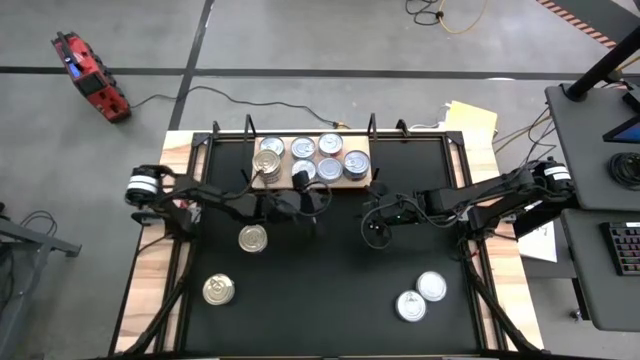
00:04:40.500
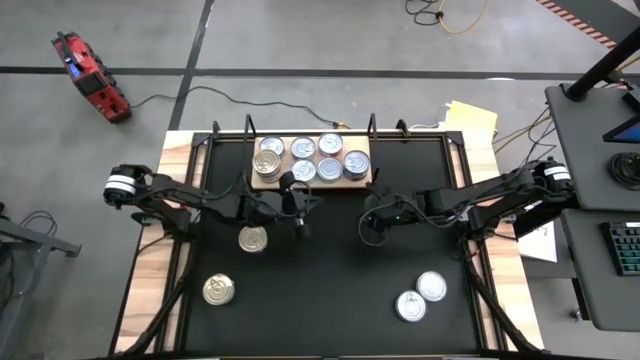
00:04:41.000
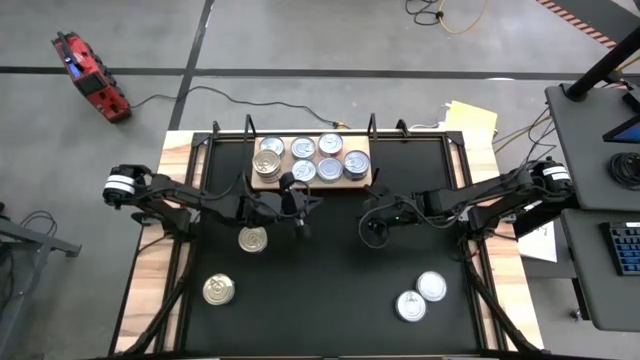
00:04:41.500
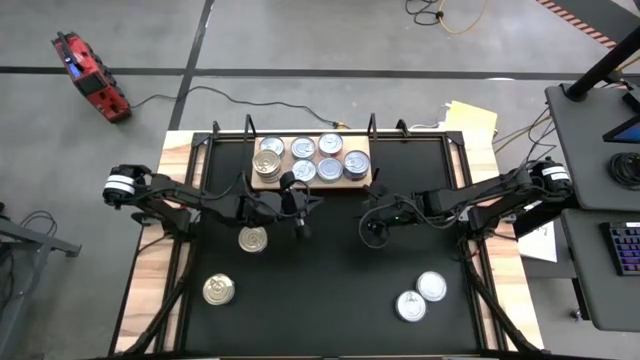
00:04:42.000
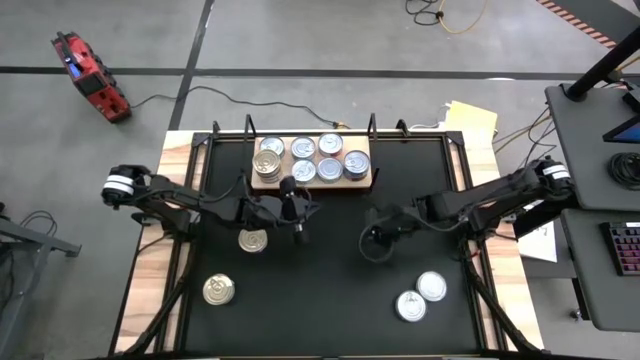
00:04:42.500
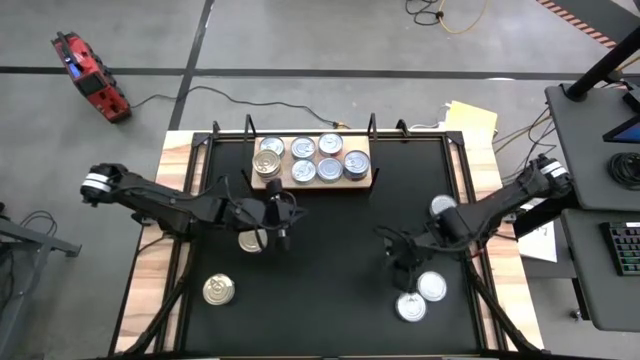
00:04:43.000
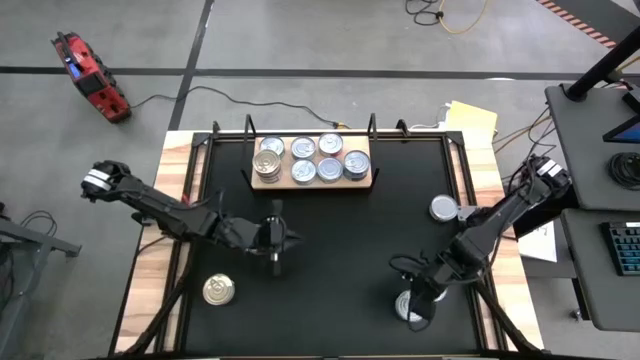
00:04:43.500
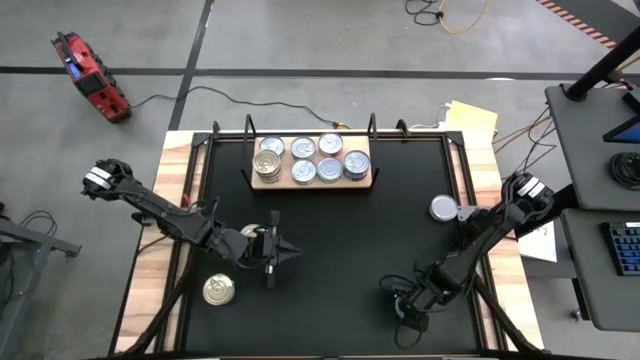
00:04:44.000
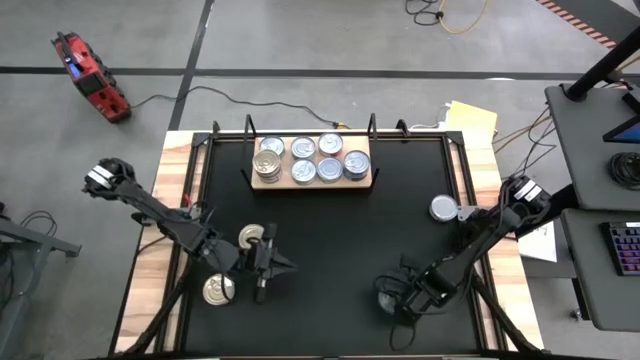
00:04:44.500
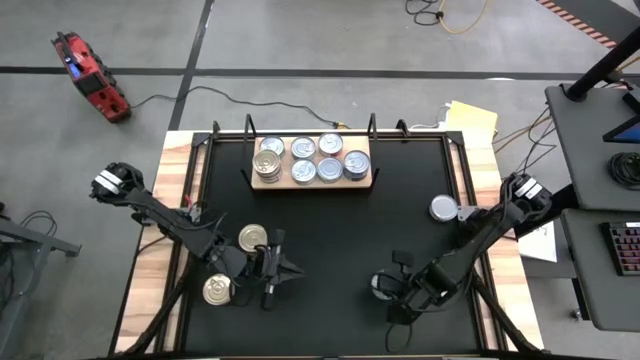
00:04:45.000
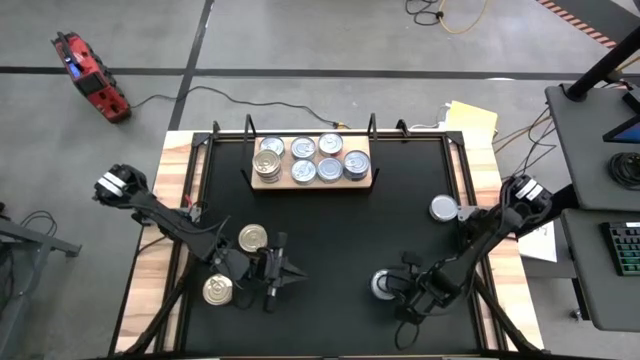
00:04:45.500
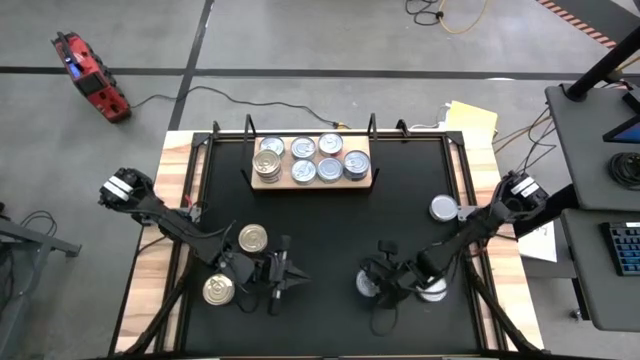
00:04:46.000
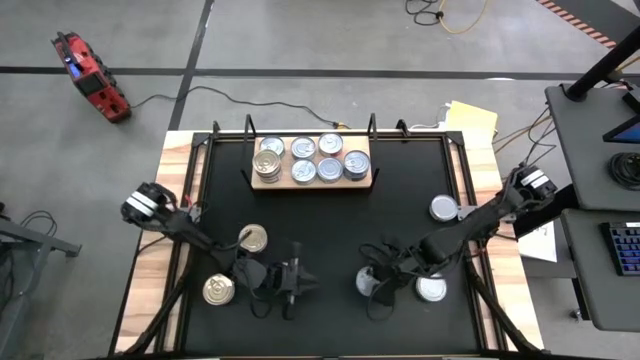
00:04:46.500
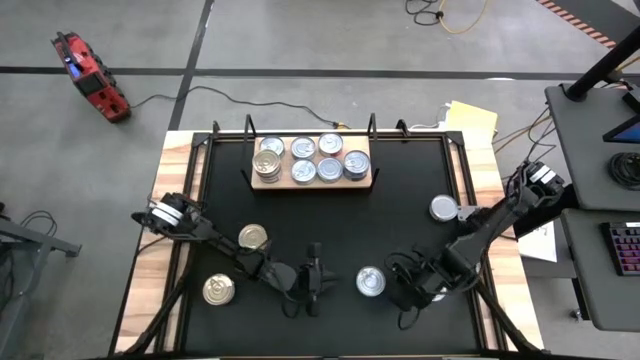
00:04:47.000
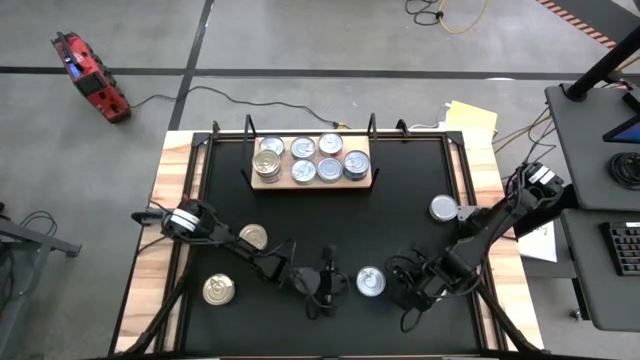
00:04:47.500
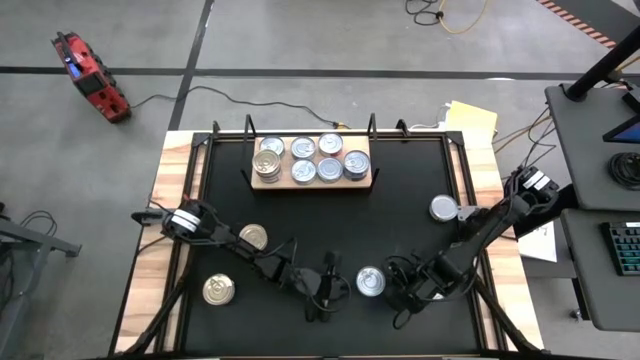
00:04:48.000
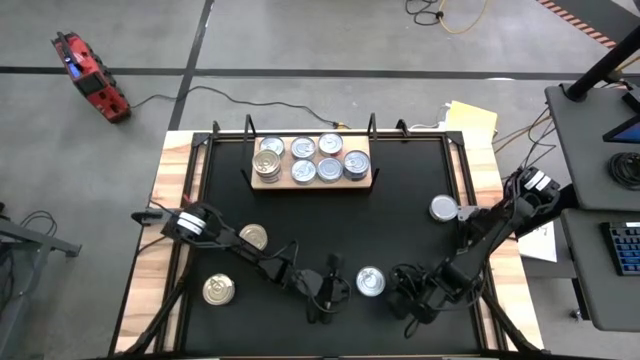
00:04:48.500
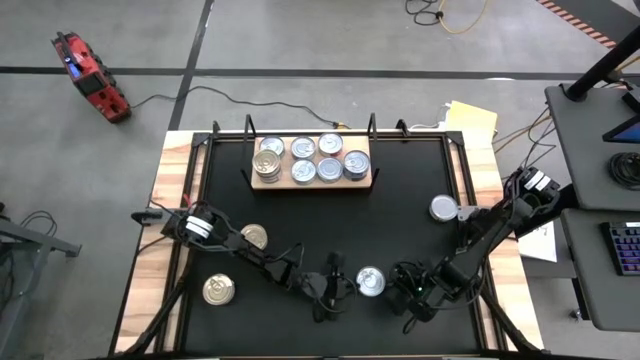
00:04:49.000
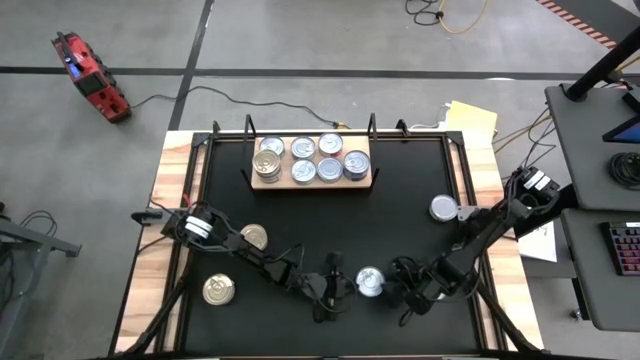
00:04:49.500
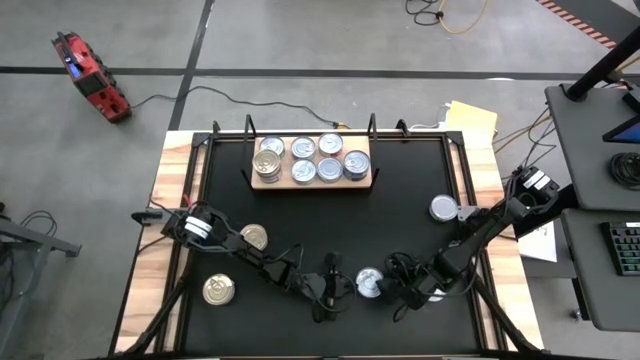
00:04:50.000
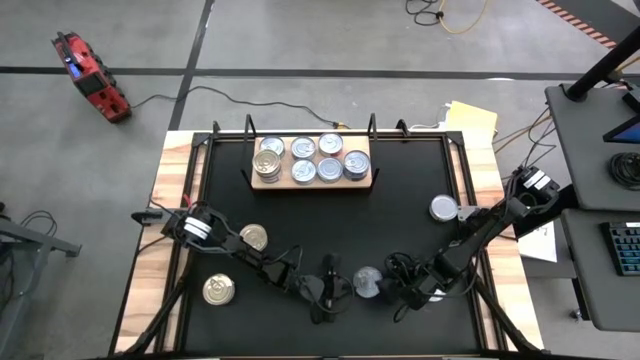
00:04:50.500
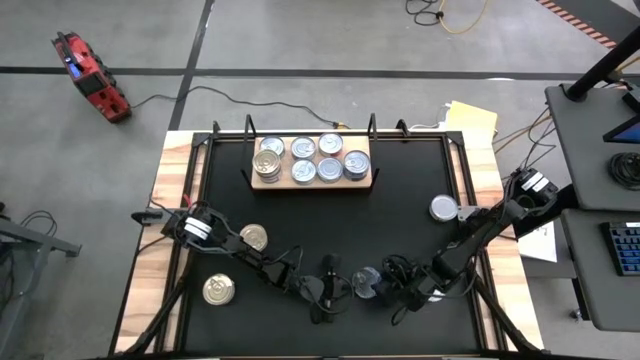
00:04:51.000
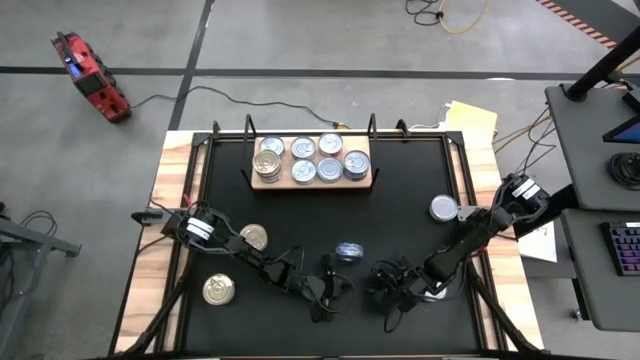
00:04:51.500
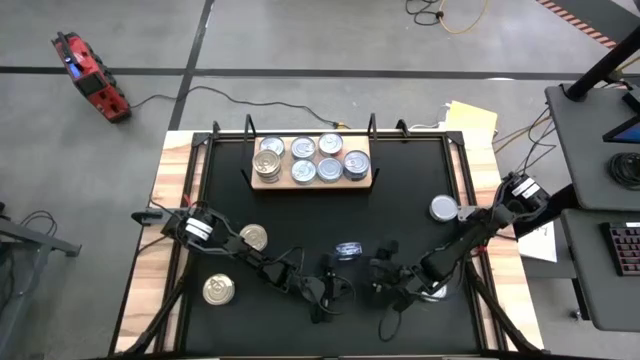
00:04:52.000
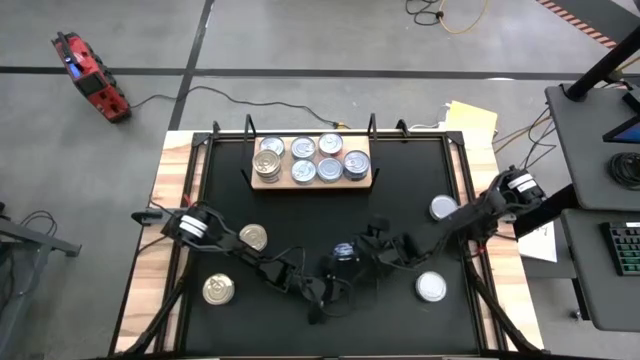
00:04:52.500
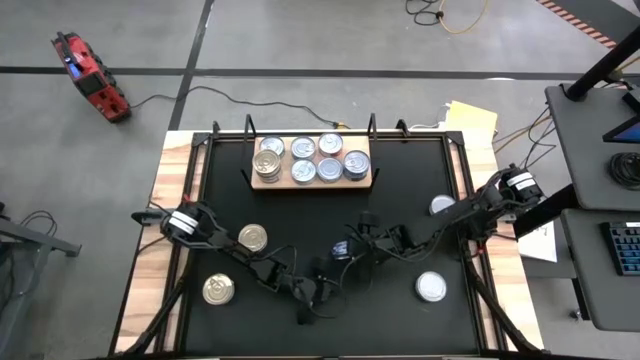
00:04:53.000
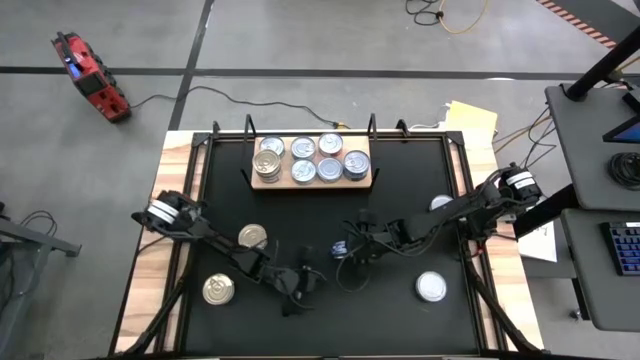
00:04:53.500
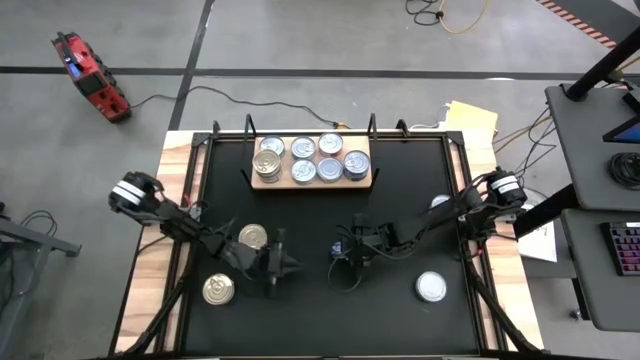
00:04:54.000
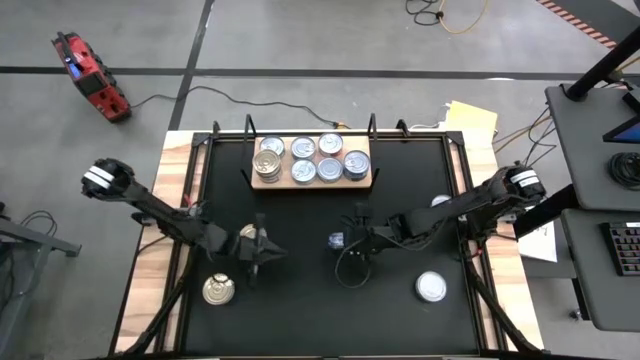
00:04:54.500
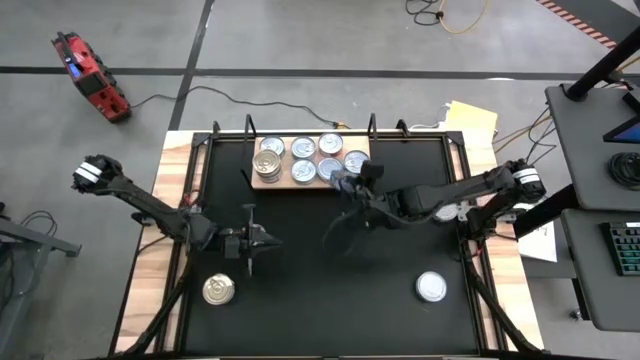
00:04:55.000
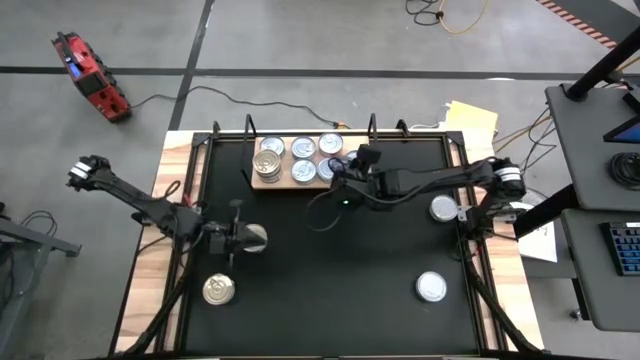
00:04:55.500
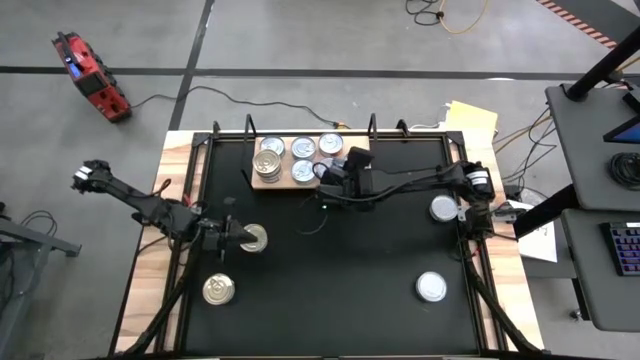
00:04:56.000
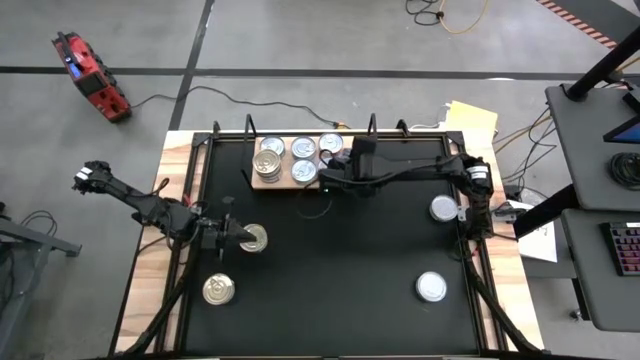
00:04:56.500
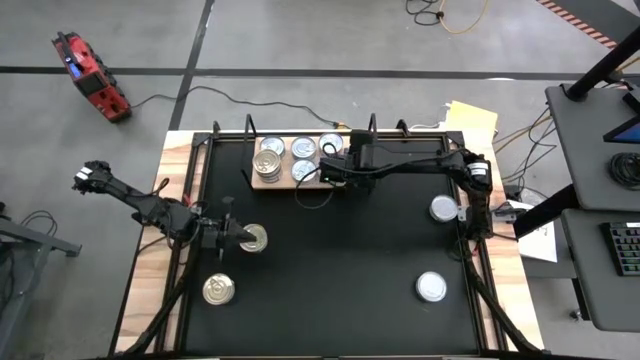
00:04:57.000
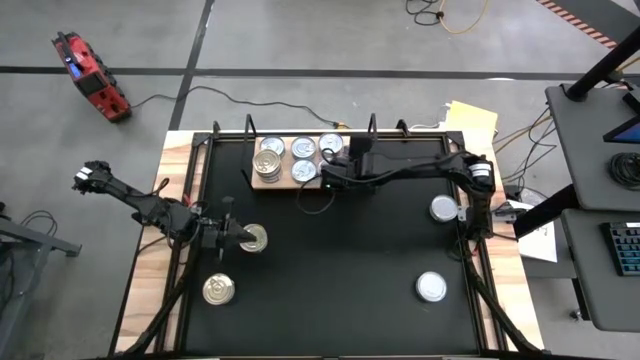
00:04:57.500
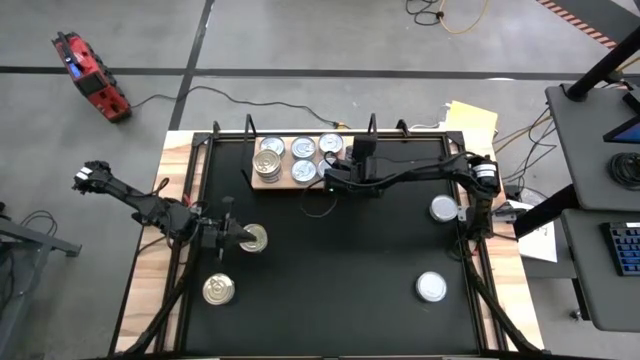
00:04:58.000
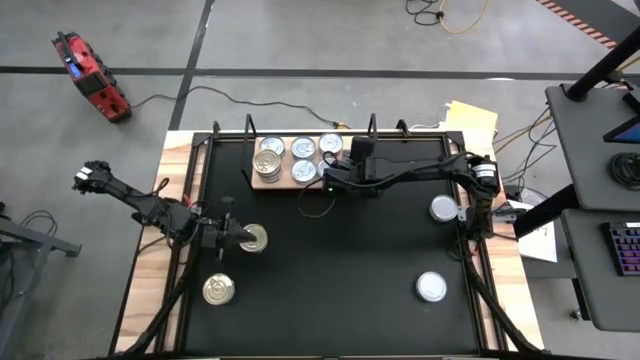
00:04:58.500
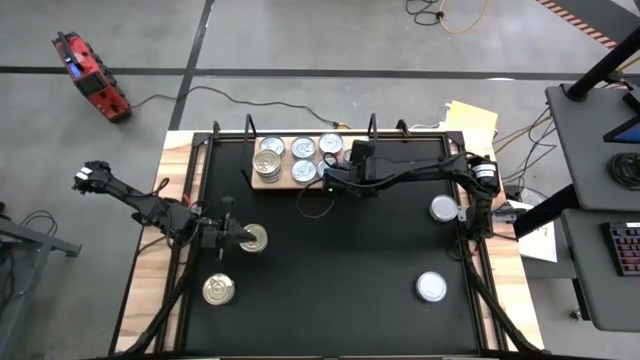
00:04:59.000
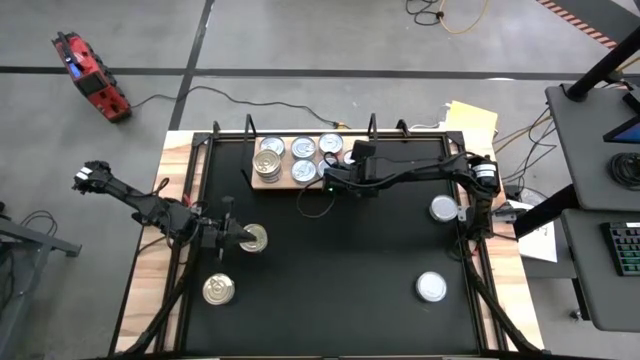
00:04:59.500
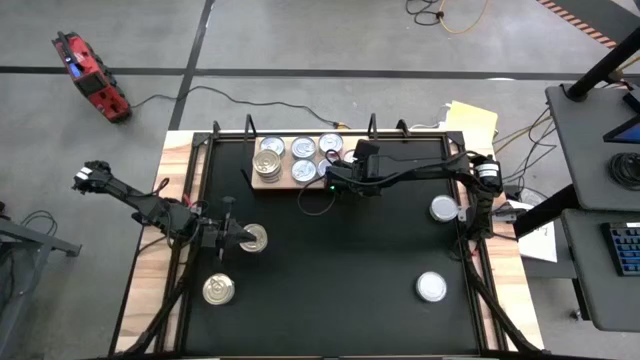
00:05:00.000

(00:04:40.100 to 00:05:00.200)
Task: Stack canned seafood by type on shelf
Stack the blue tuna can on top of the other blue tuna cans on the shelf

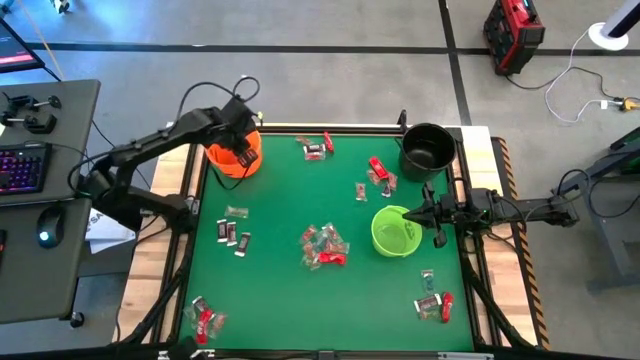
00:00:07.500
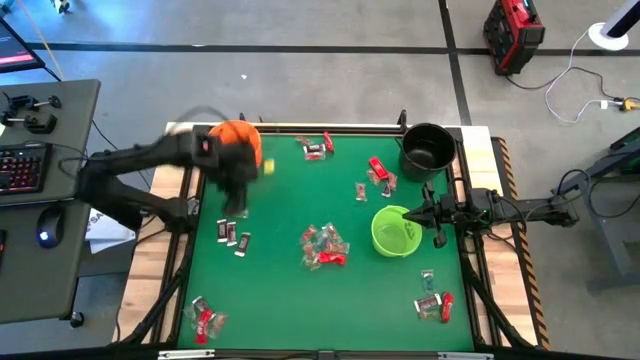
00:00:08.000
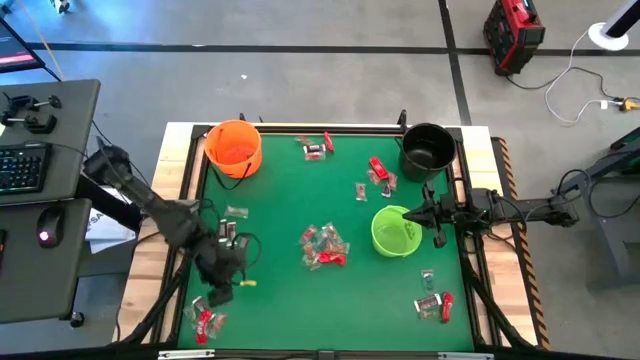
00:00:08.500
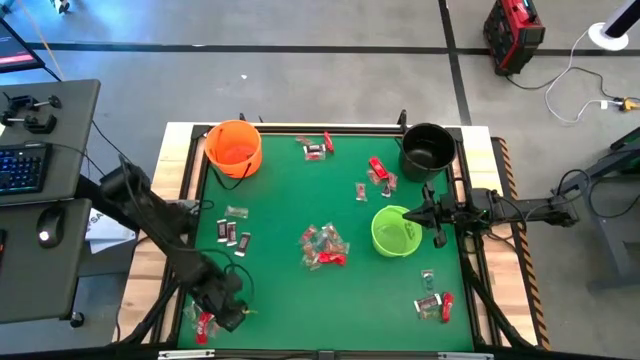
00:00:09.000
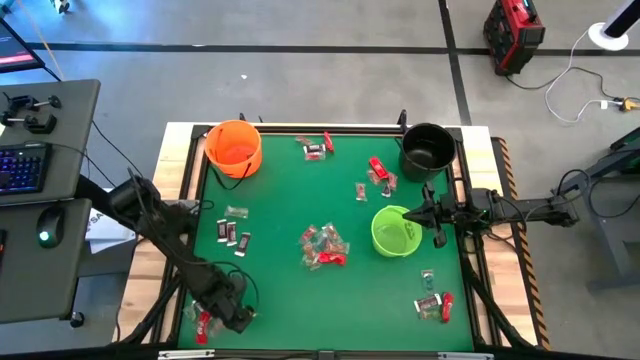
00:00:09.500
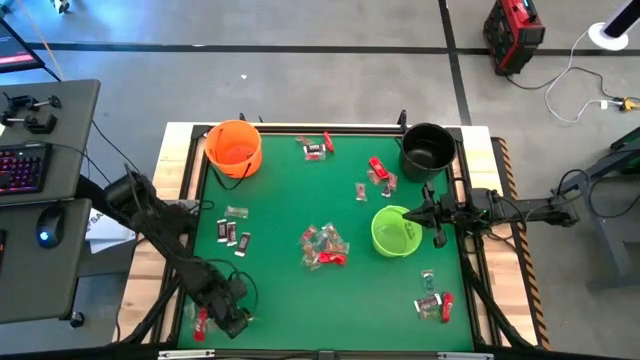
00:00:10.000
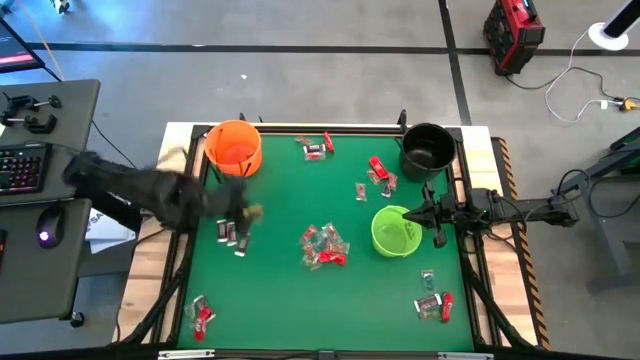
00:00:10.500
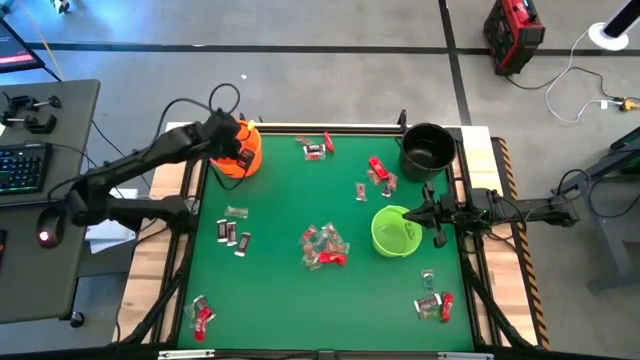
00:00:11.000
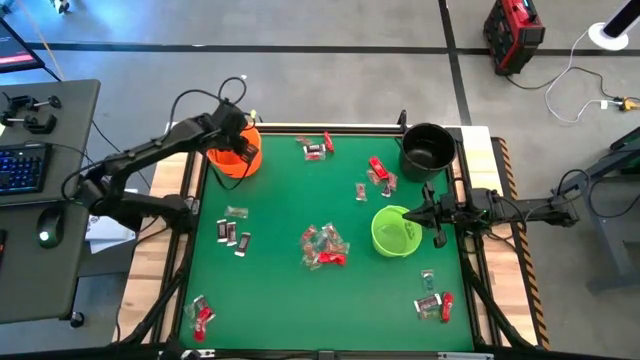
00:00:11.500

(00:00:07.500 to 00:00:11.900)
Task: Sort candy by brand, put in halloween buckets
Put the orange gummy into the orange bucket
